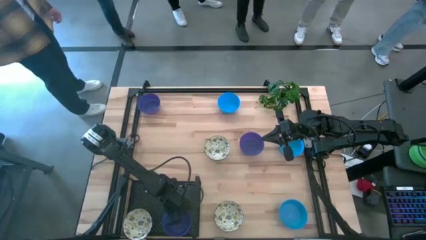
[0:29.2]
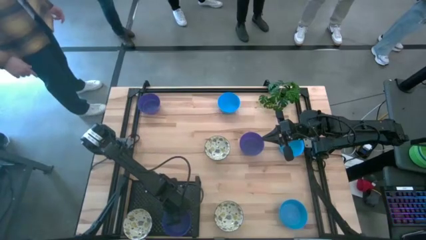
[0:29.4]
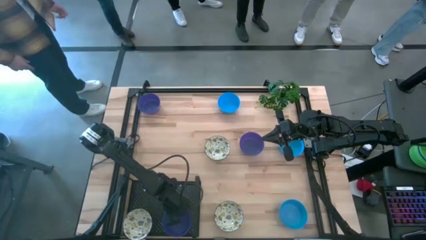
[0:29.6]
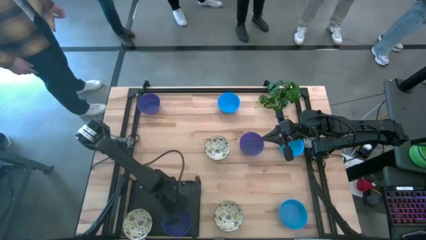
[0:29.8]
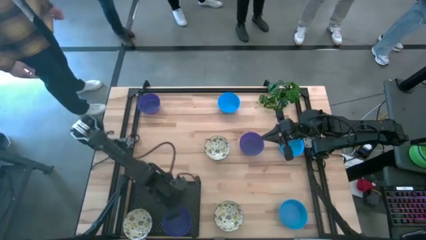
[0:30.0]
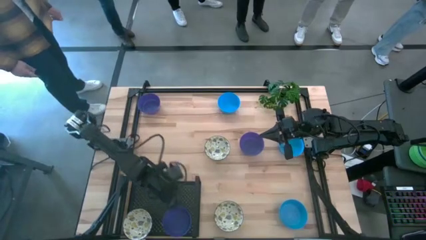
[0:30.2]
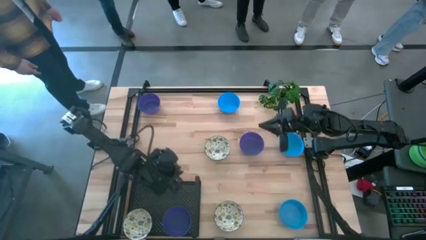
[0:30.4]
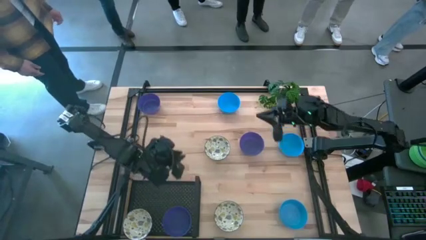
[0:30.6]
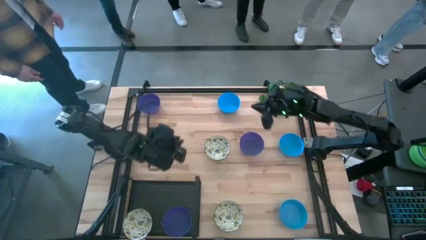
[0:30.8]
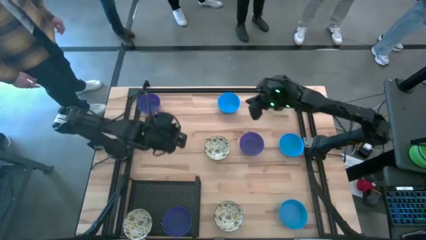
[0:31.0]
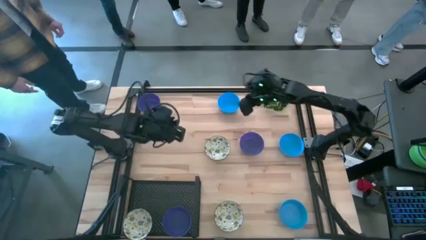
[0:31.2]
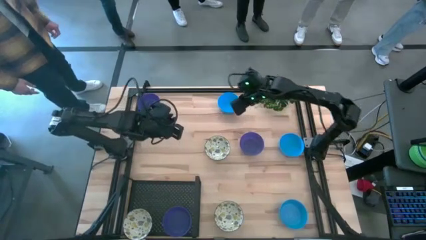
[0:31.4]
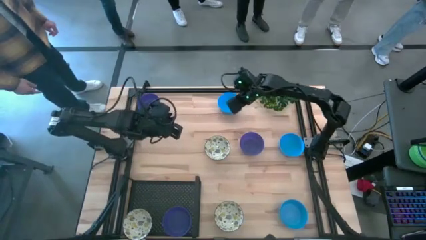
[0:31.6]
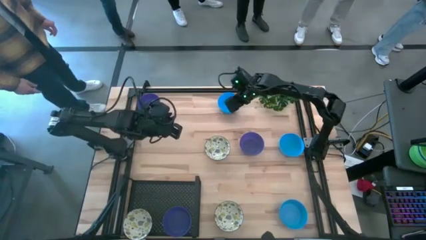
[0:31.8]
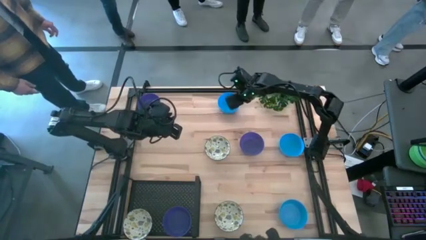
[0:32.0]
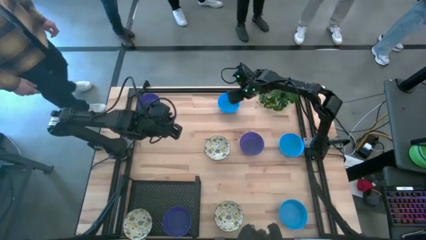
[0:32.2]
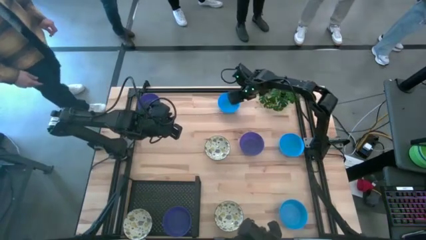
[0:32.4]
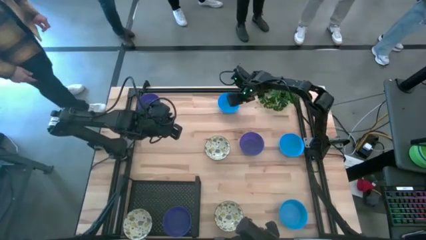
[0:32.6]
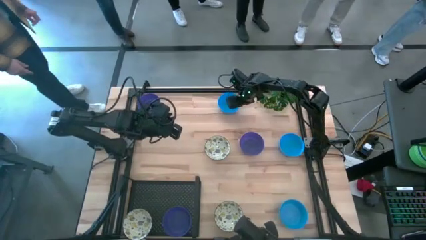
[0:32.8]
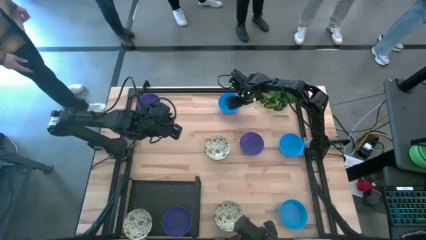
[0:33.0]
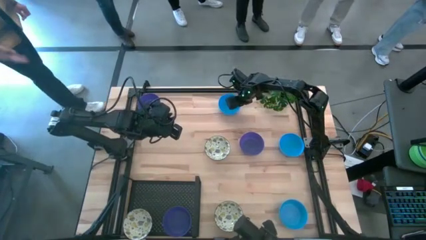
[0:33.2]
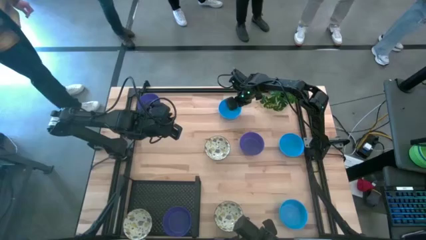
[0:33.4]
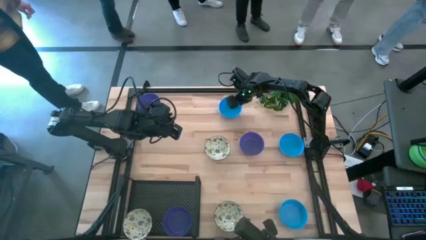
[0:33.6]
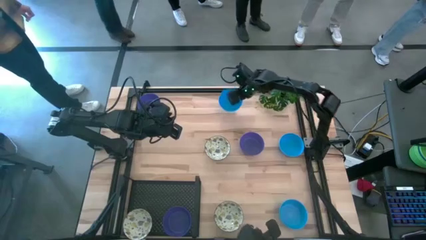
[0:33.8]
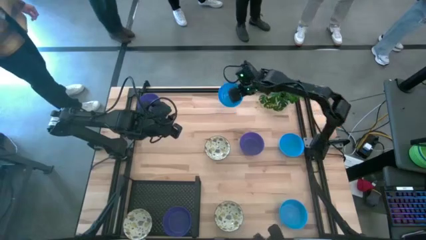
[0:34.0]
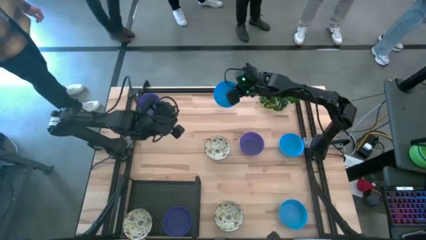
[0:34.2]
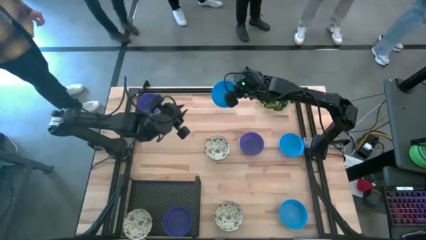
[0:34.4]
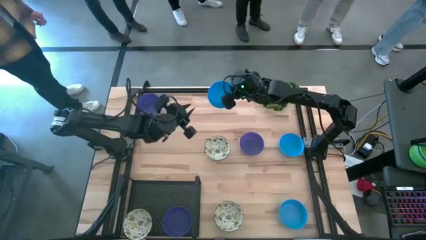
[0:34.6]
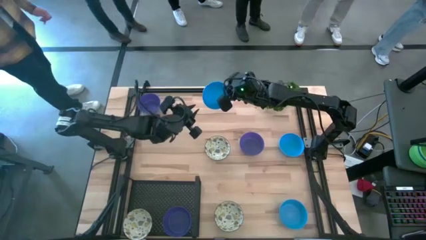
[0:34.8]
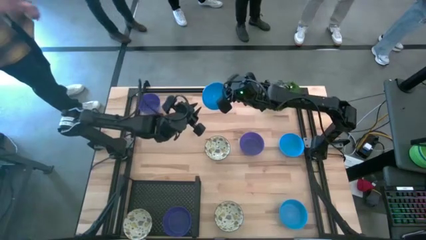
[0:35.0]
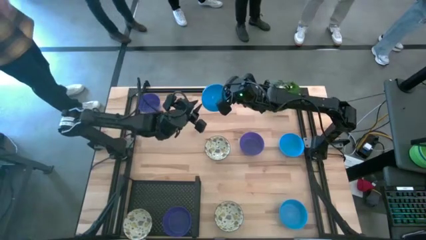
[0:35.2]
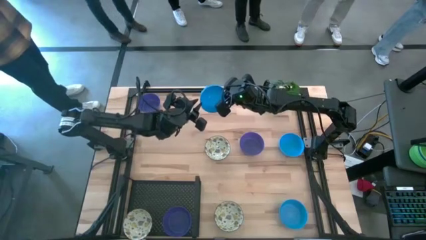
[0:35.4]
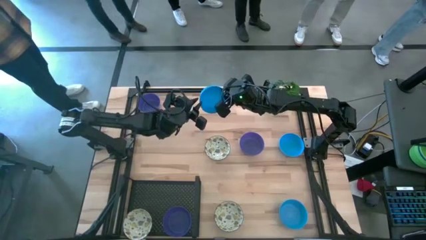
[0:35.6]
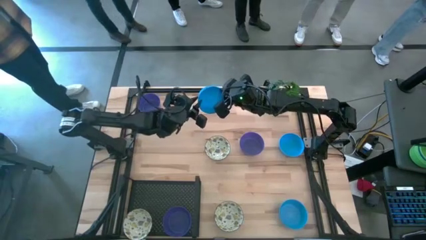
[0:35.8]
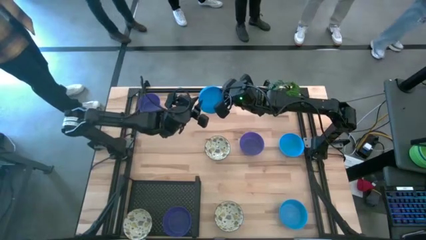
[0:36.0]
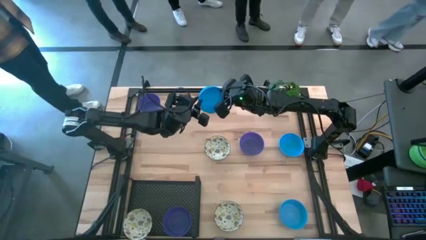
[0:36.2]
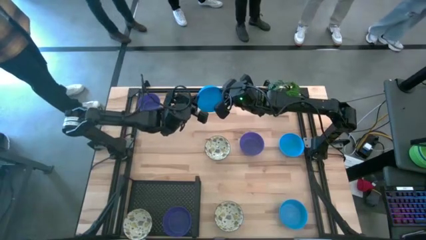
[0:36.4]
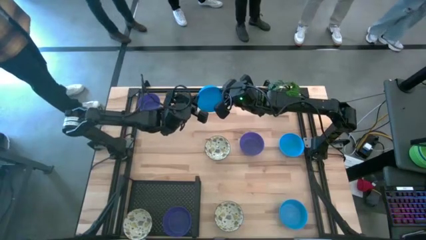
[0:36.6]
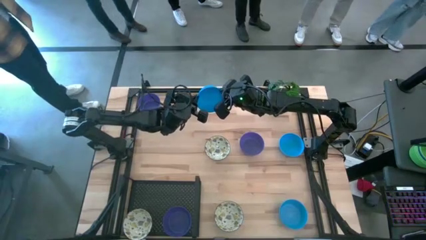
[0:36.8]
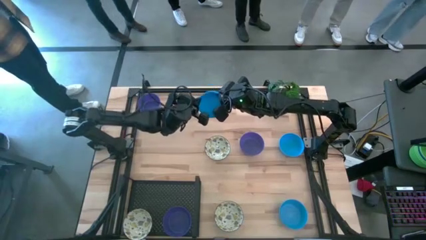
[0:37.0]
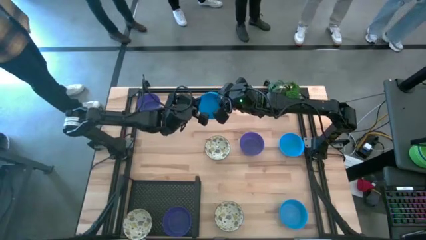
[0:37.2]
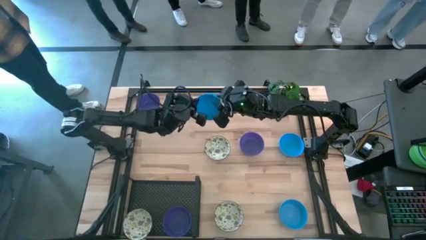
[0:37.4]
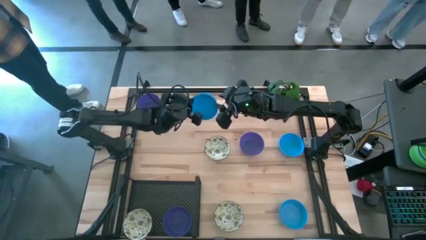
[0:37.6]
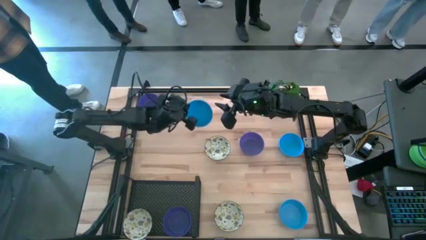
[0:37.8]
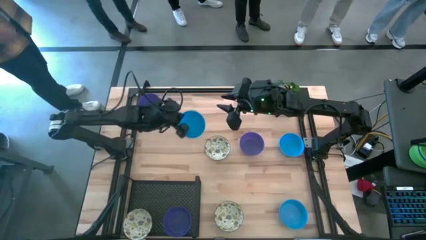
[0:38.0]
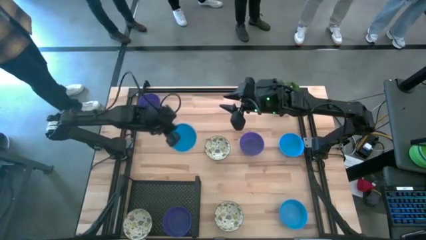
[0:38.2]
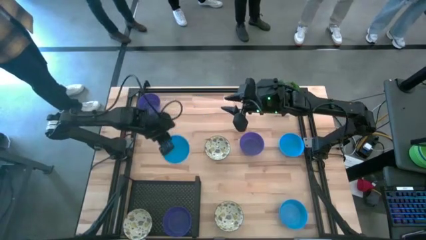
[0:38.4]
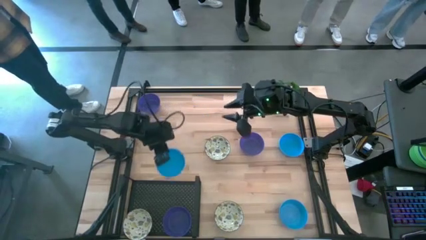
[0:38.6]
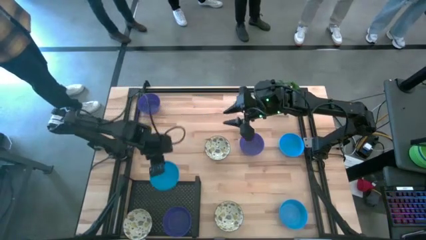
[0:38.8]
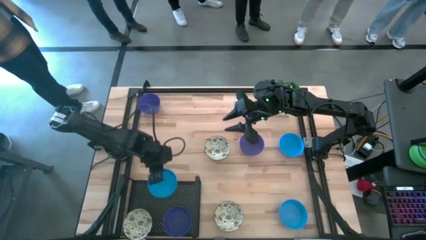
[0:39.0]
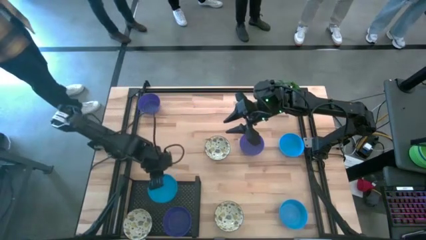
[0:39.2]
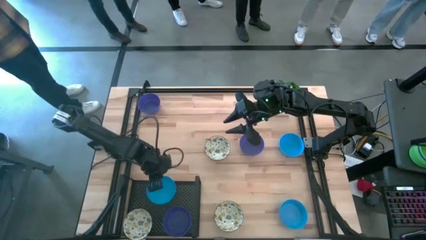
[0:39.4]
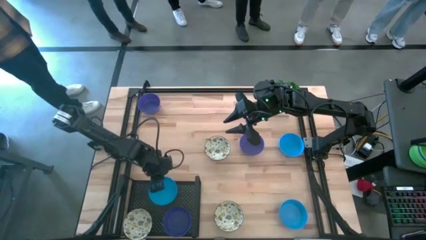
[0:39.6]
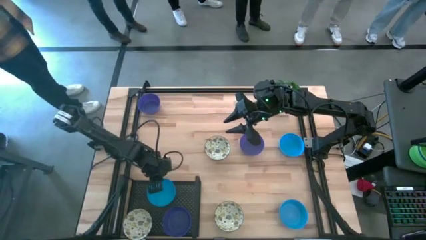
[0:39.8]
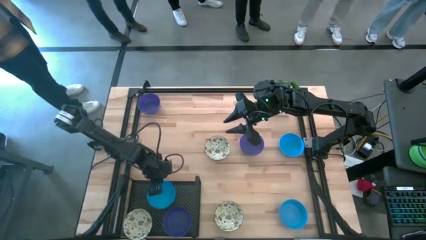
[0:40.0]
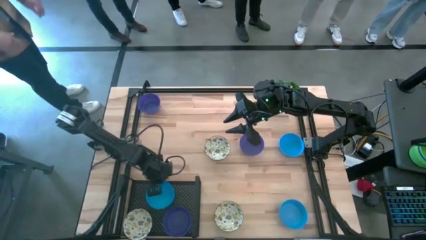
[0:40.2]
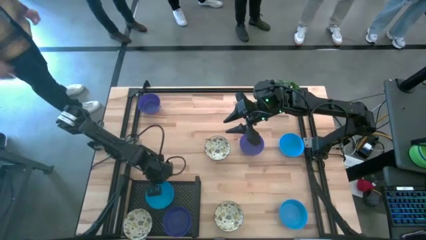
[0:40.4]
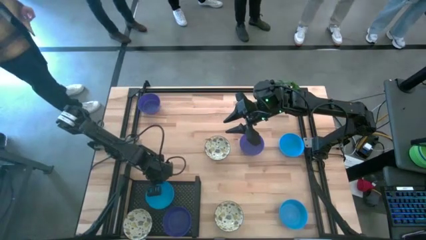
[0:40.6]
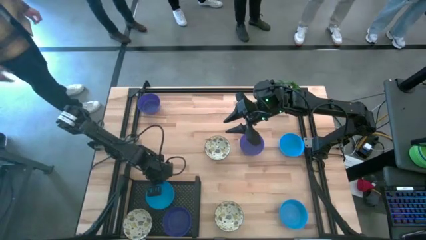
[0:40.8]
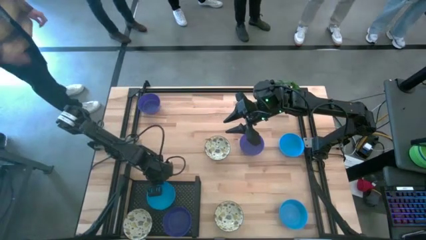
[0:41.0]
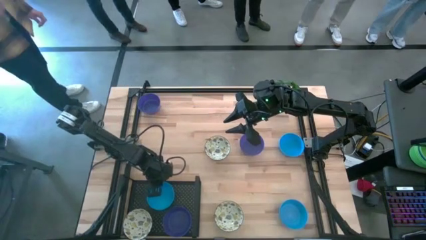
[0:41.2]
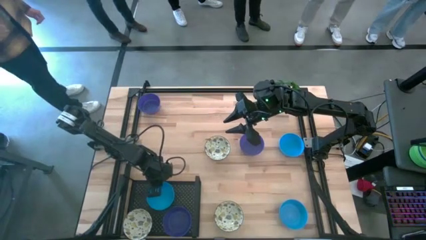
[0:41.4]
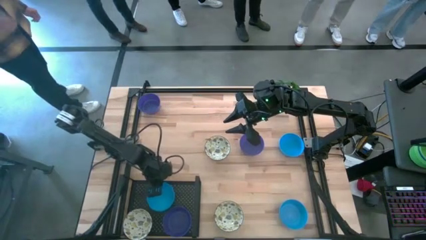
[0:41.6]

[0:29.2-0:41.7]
Task: Pick & Place Mini bowls
Put the top left blue bowl on the shelf
